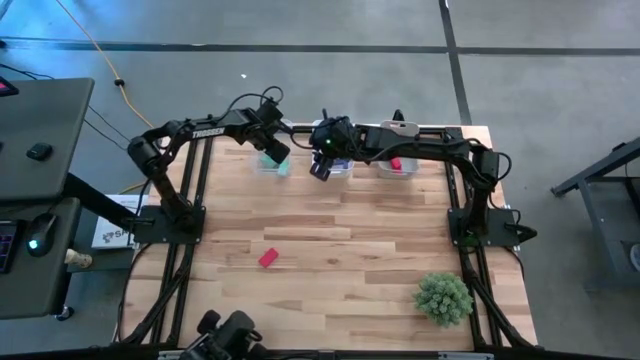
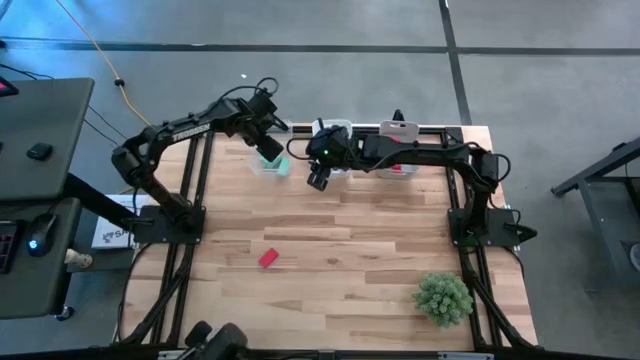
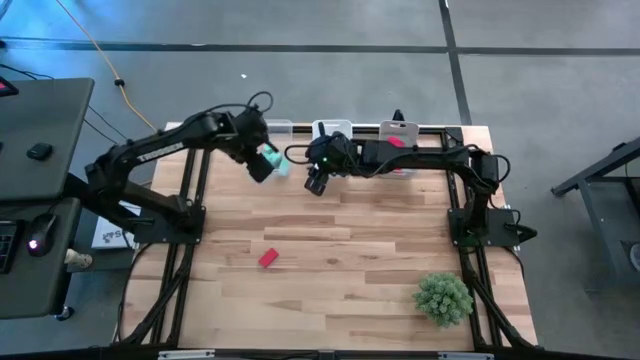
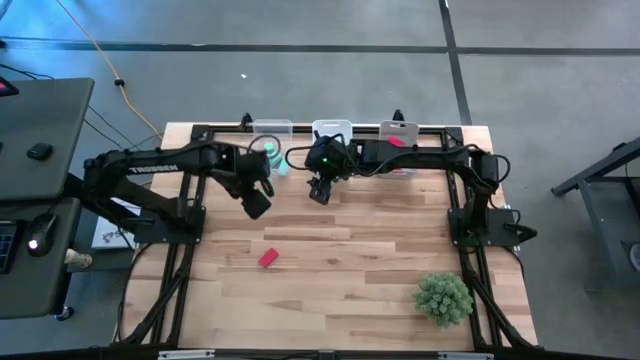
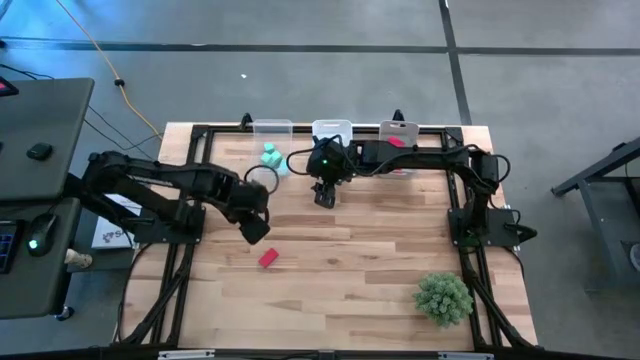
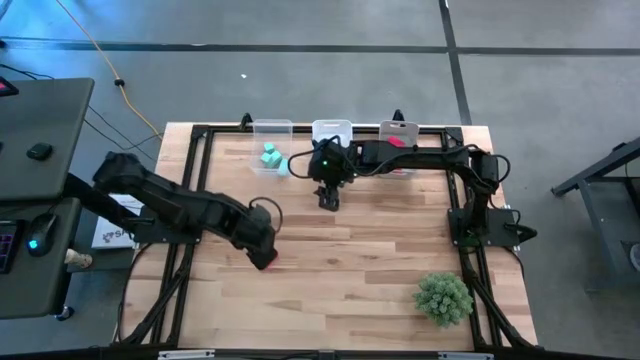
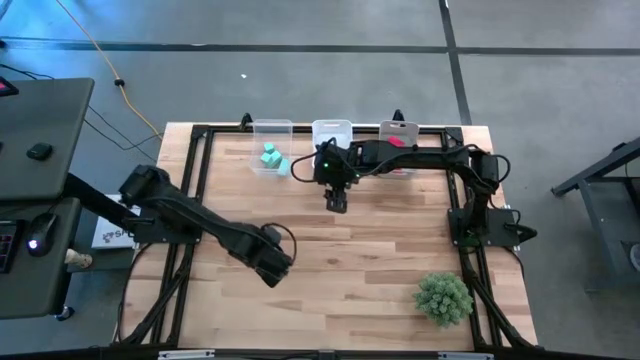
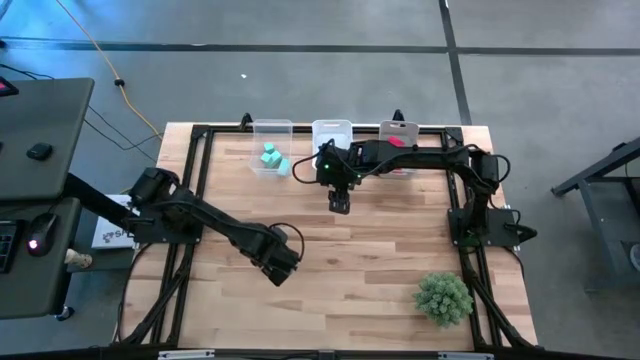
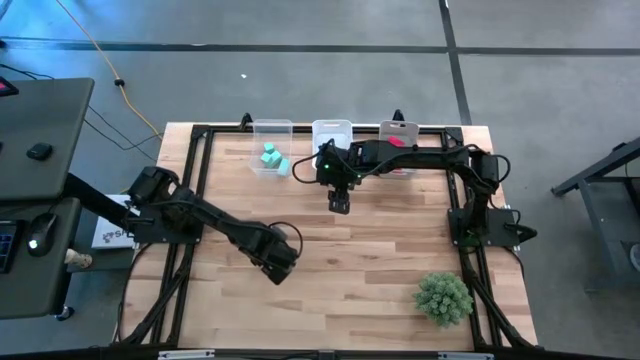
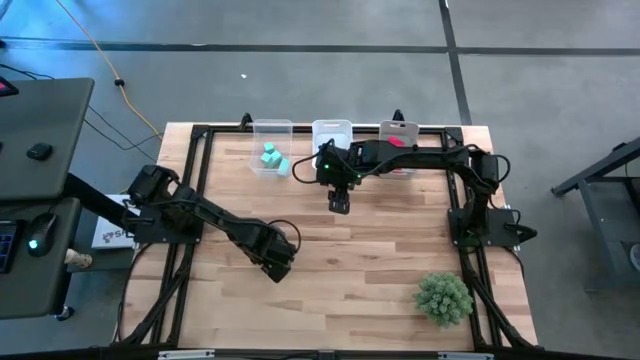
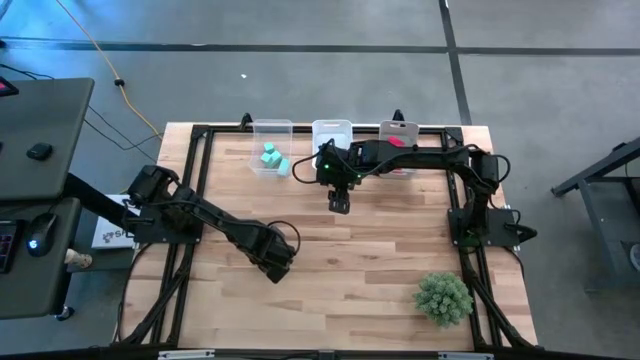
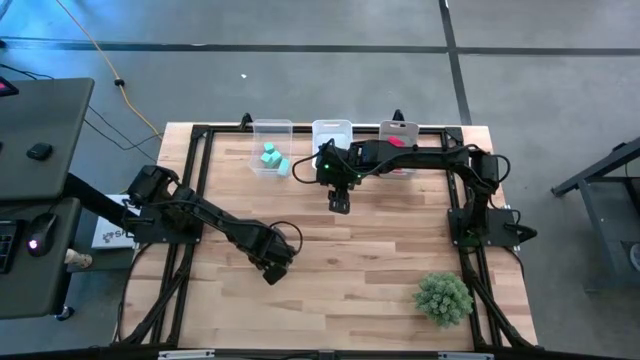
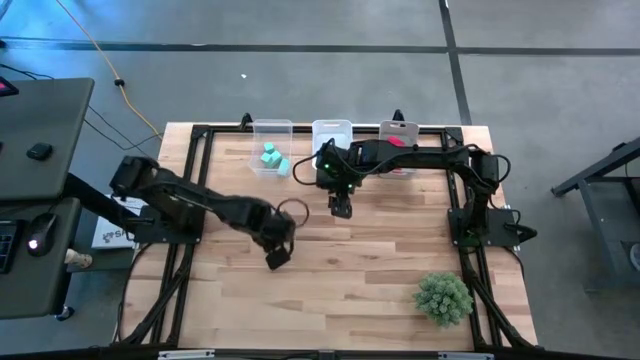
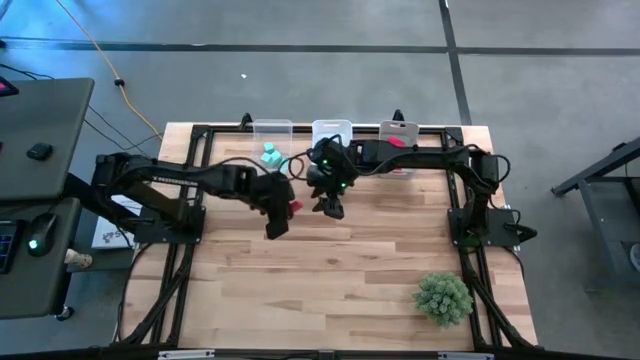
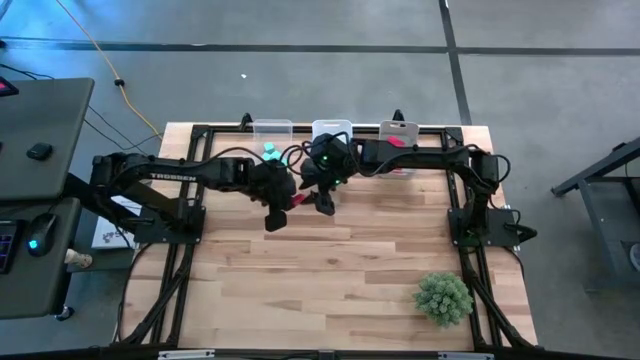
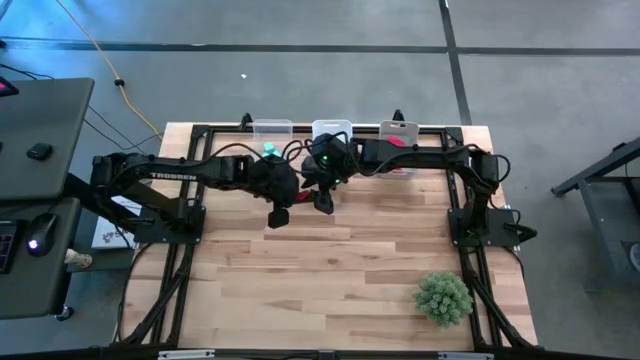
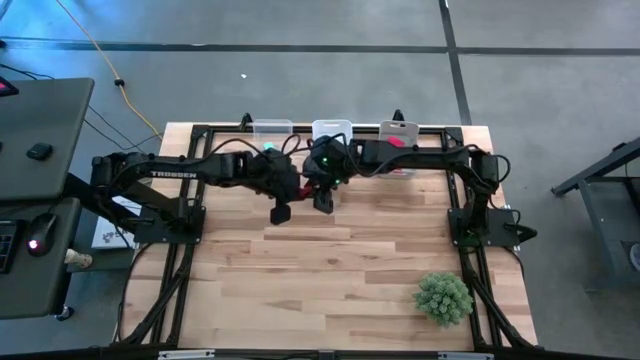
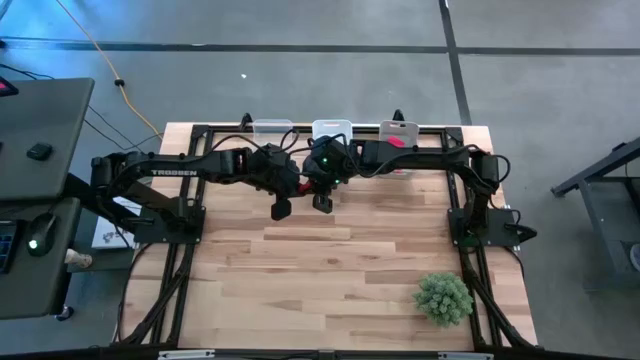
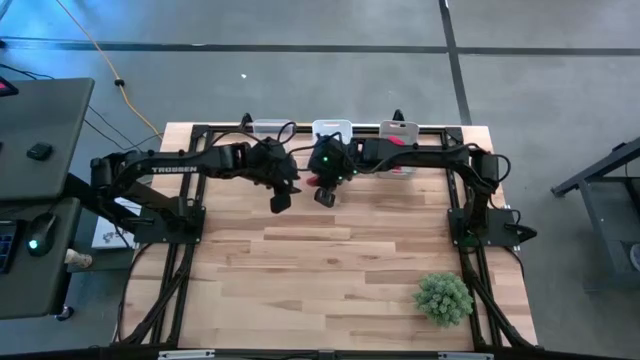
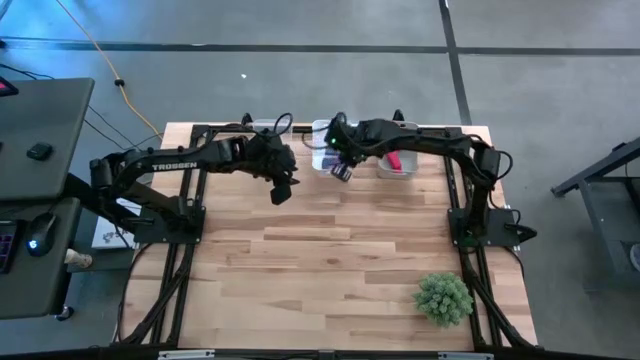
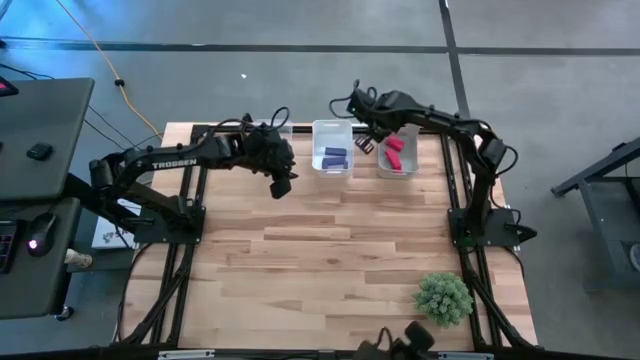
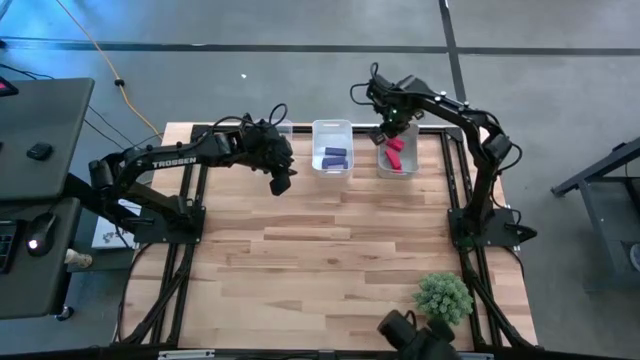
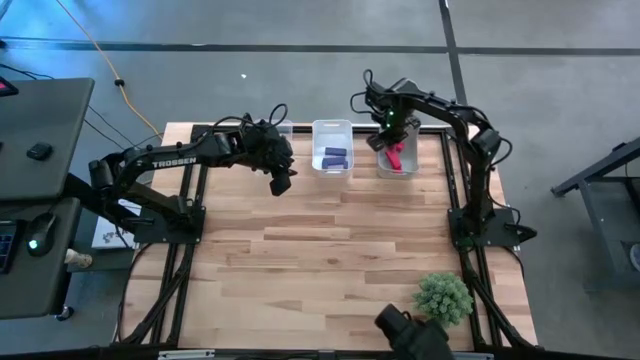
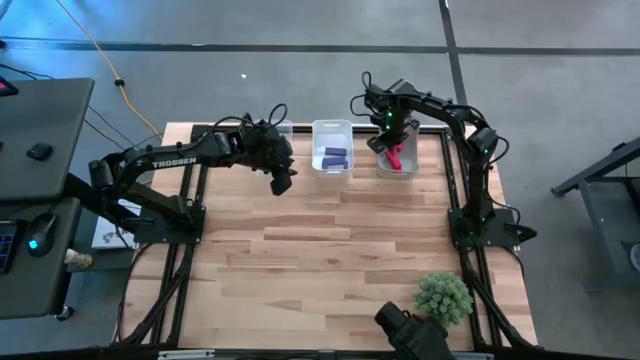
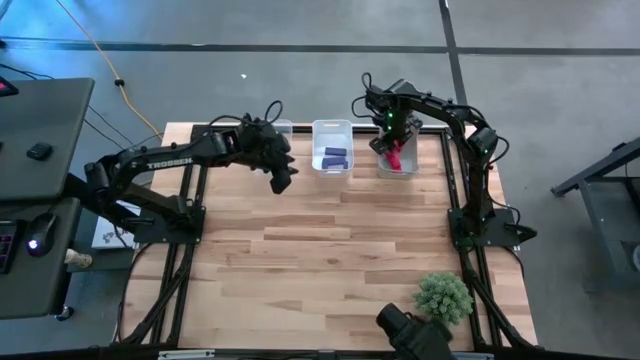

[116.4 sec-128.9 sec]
Task: Sort & place blocks by color
Put the red block into the gray bin

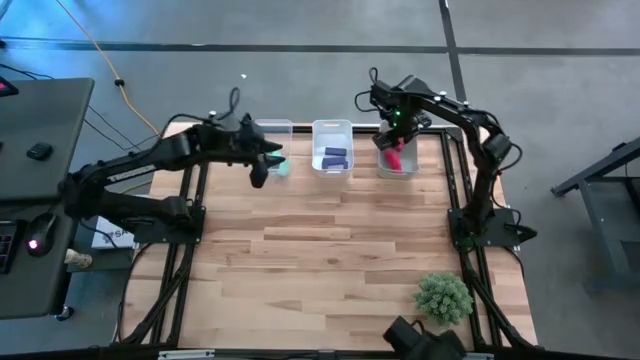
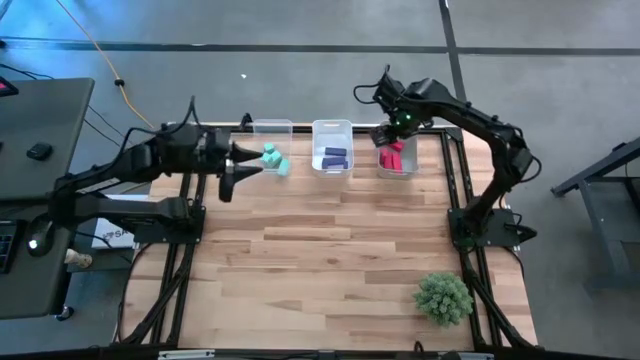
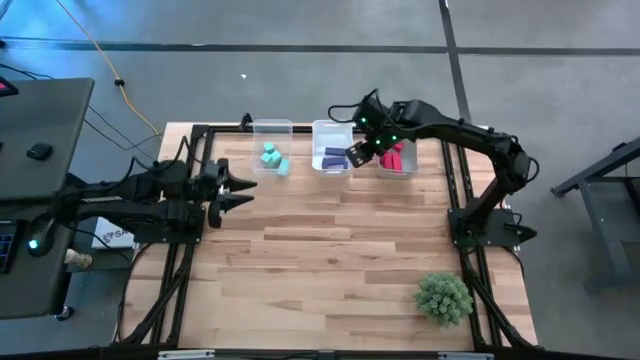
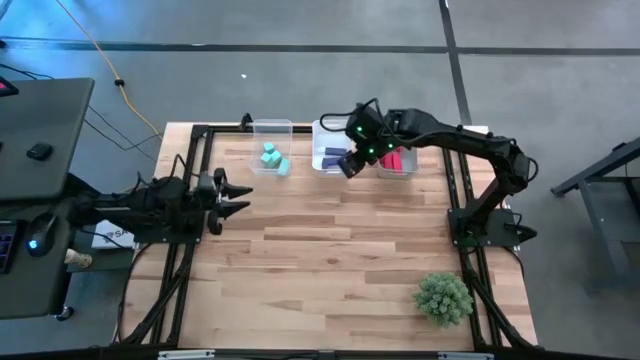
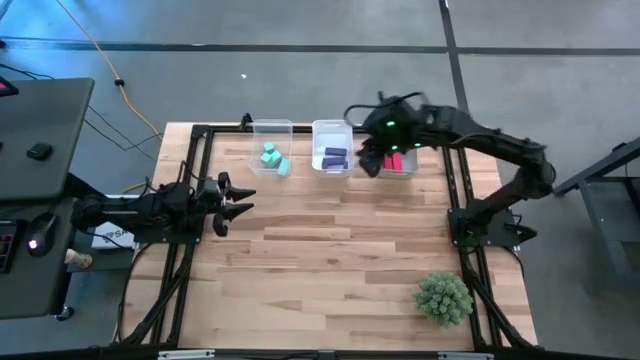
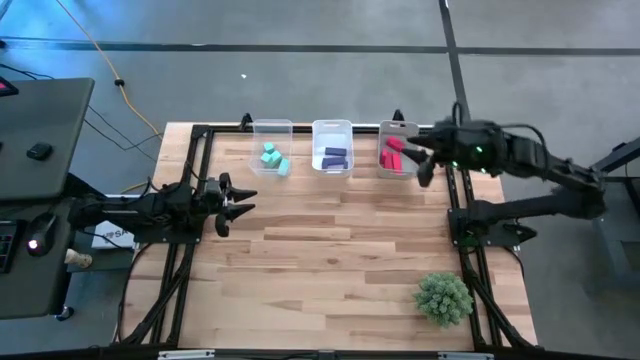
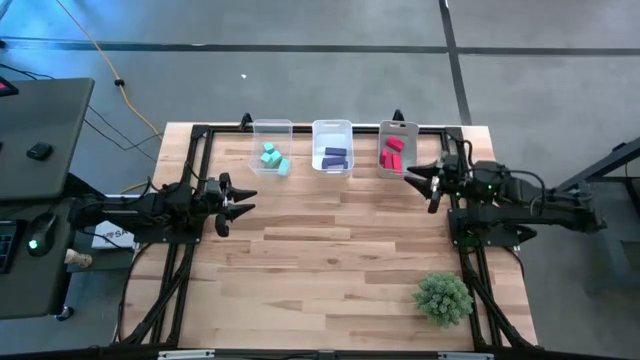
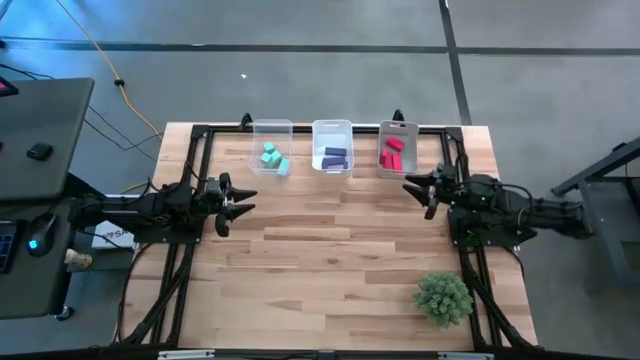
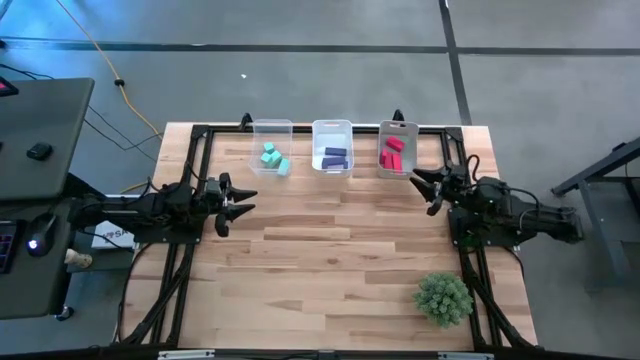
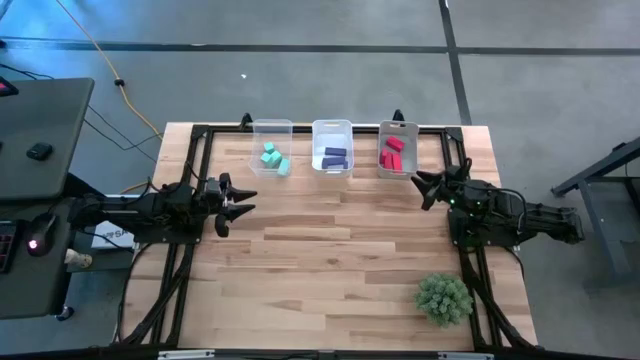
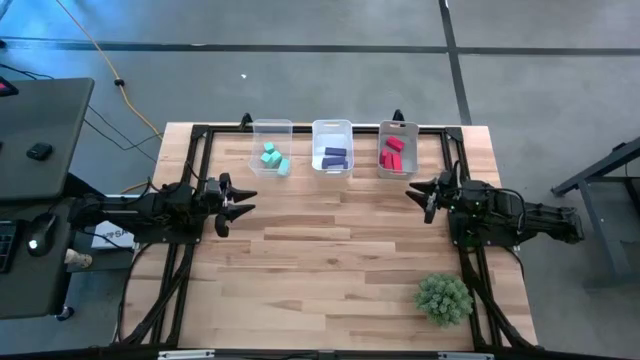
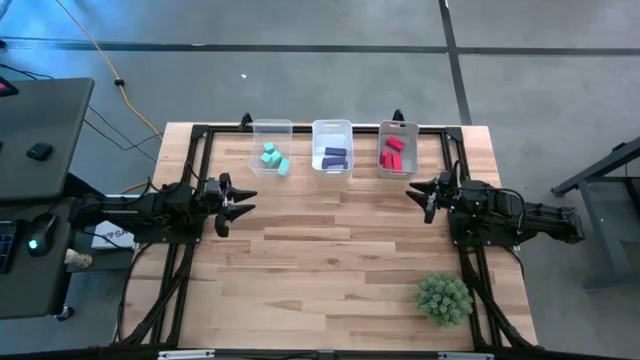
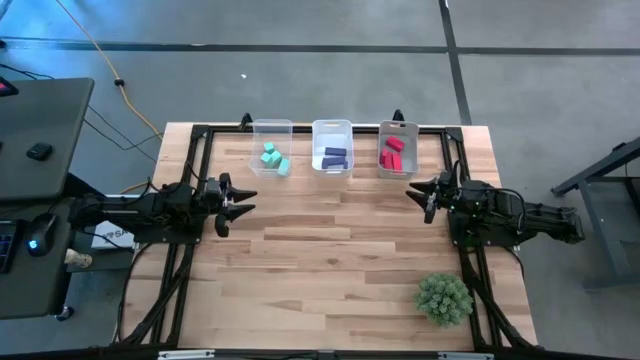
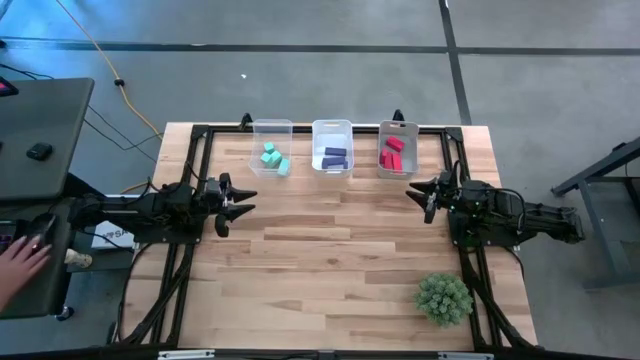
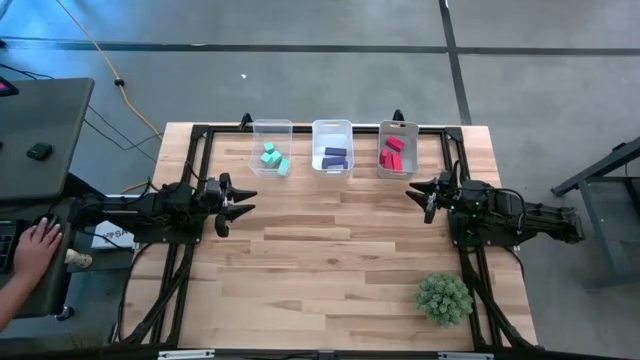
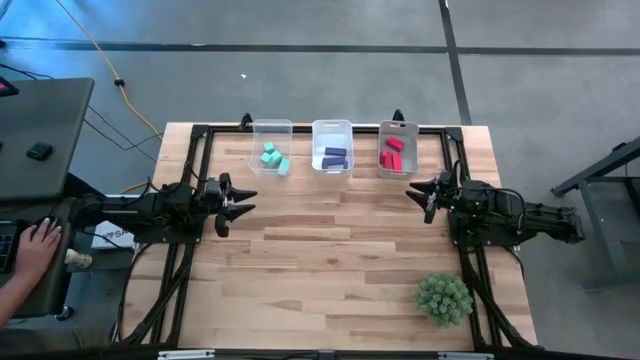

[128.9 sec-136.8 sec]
Return to Home Position
